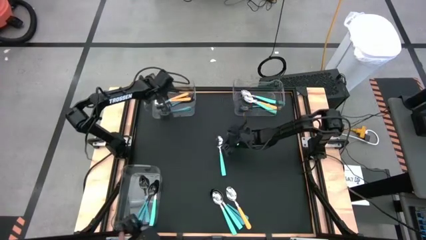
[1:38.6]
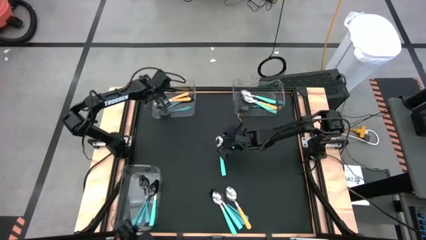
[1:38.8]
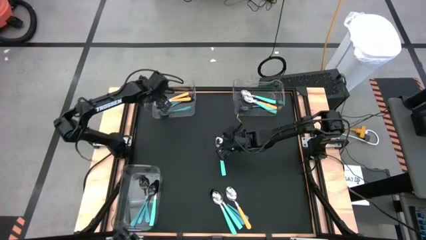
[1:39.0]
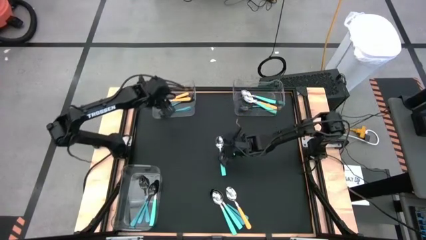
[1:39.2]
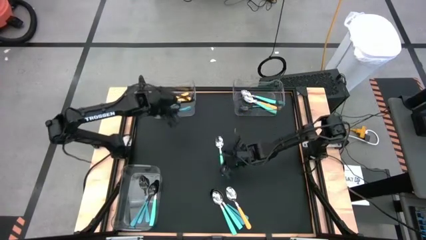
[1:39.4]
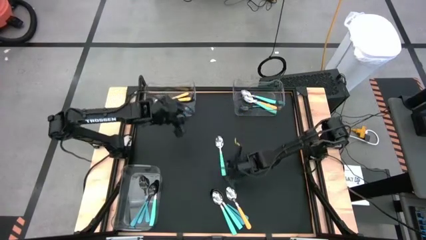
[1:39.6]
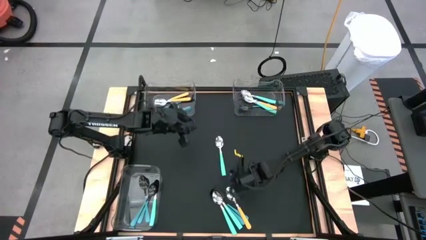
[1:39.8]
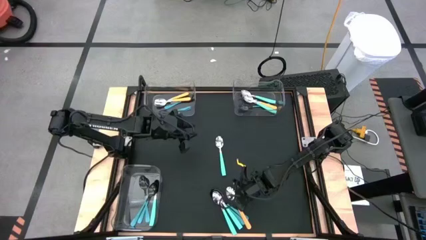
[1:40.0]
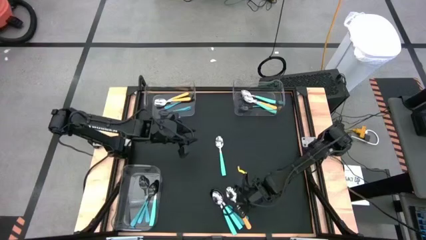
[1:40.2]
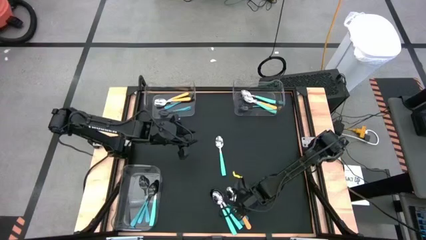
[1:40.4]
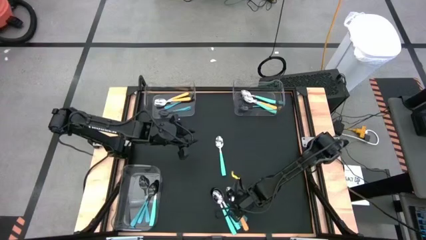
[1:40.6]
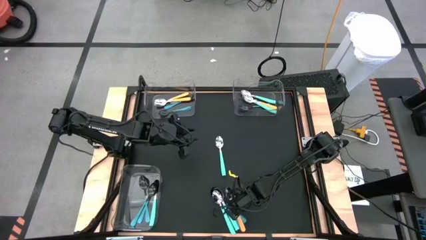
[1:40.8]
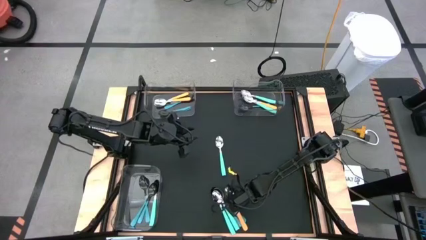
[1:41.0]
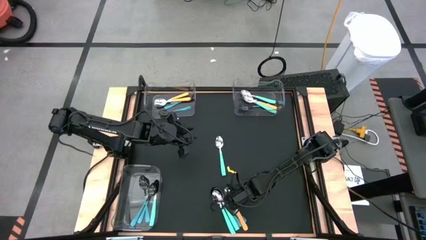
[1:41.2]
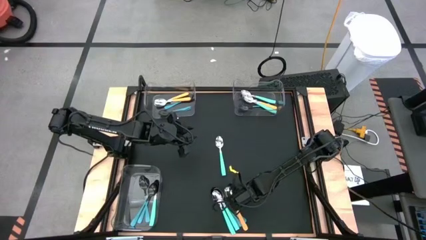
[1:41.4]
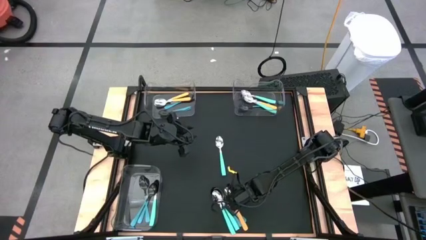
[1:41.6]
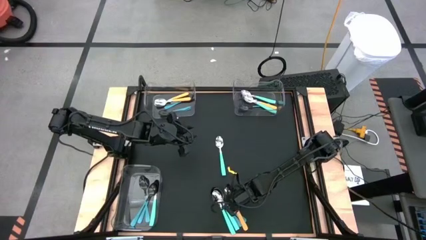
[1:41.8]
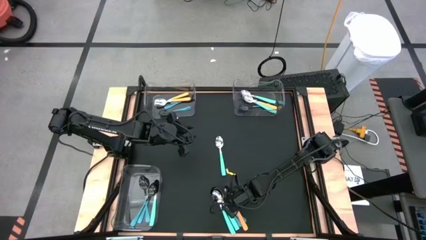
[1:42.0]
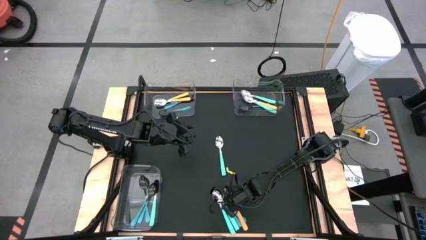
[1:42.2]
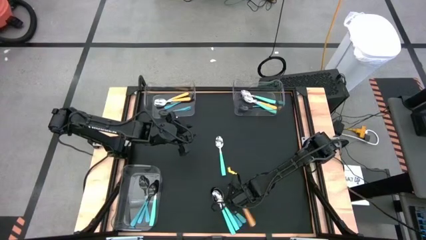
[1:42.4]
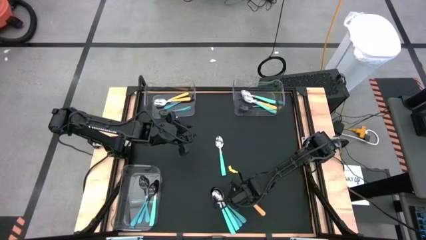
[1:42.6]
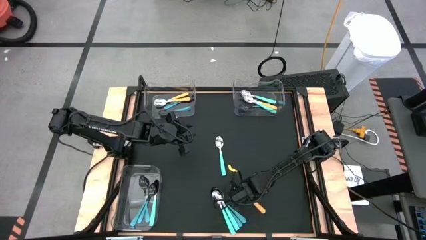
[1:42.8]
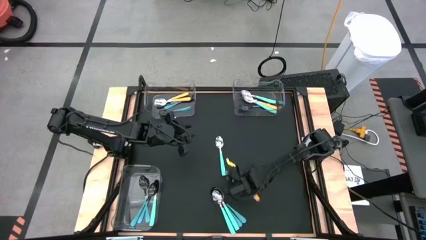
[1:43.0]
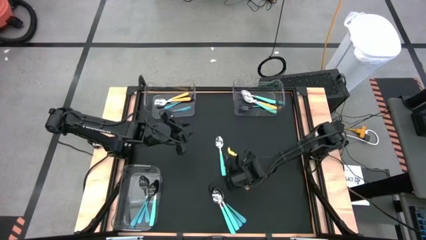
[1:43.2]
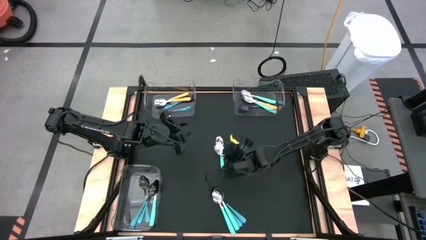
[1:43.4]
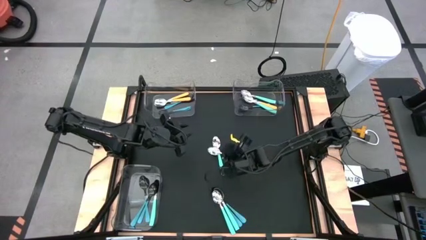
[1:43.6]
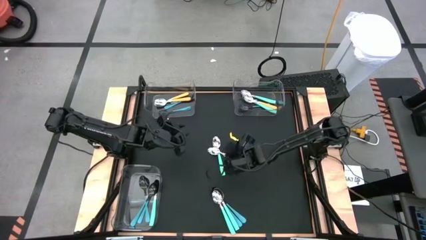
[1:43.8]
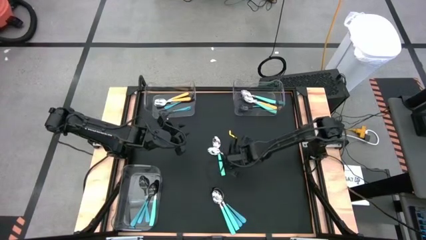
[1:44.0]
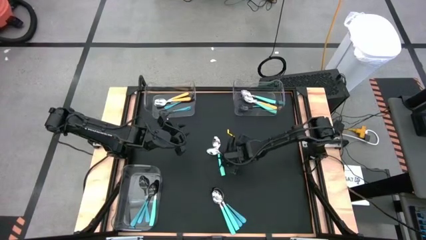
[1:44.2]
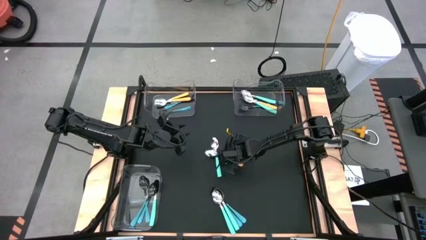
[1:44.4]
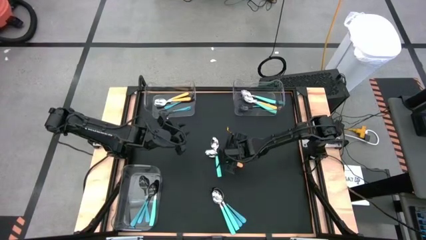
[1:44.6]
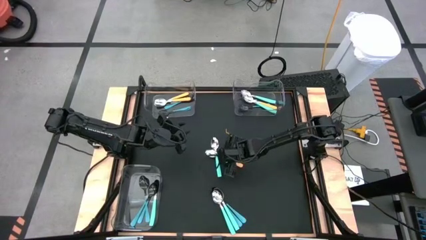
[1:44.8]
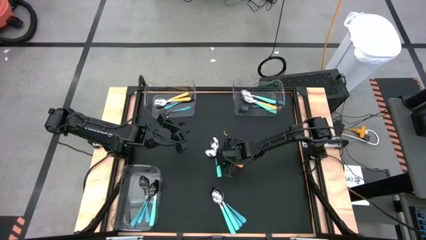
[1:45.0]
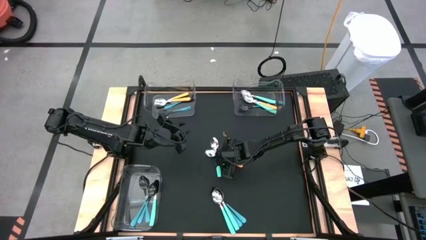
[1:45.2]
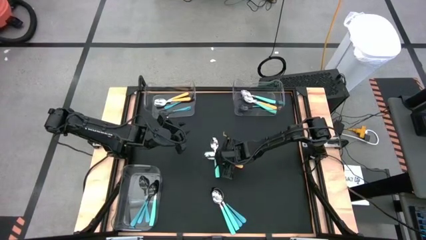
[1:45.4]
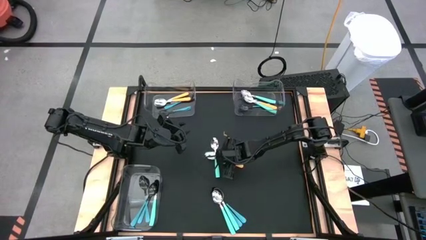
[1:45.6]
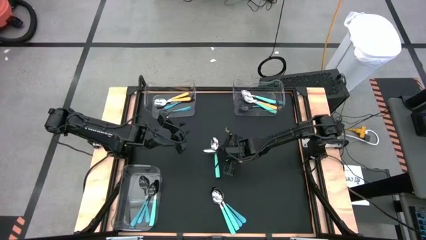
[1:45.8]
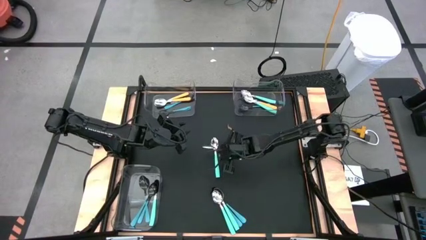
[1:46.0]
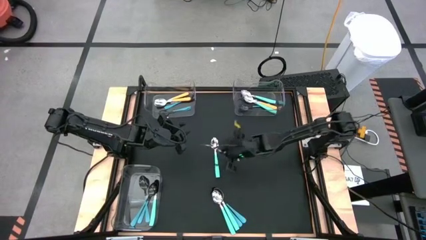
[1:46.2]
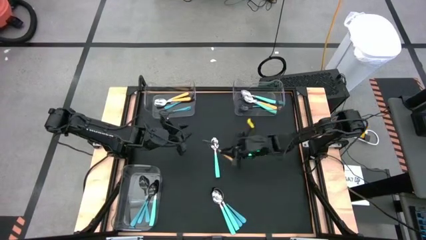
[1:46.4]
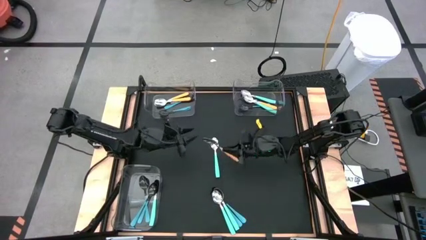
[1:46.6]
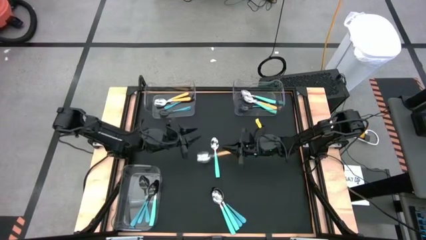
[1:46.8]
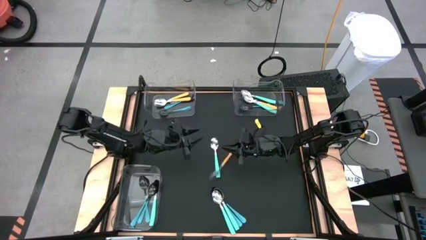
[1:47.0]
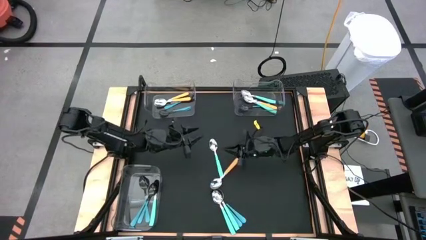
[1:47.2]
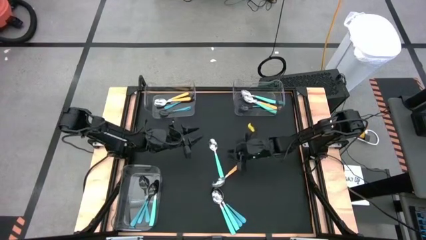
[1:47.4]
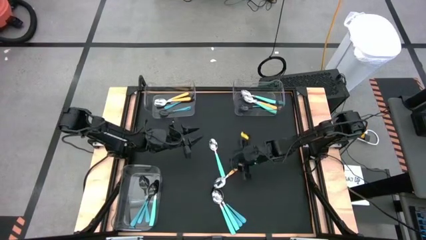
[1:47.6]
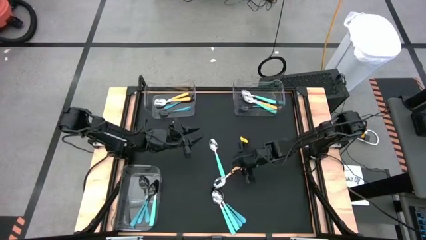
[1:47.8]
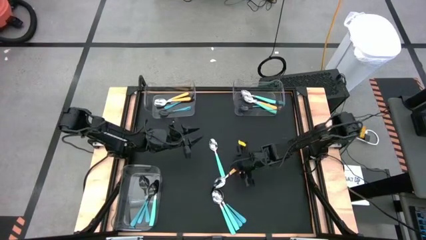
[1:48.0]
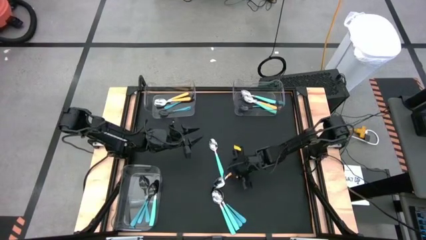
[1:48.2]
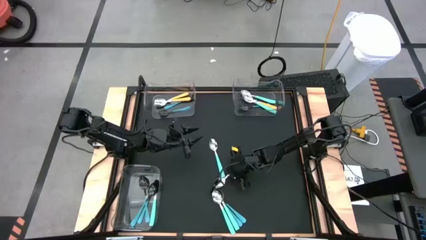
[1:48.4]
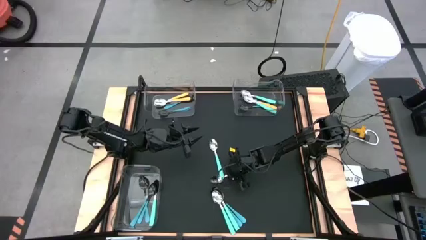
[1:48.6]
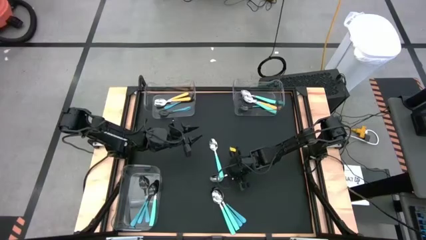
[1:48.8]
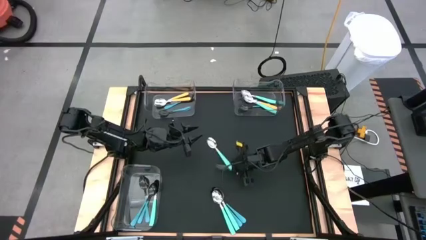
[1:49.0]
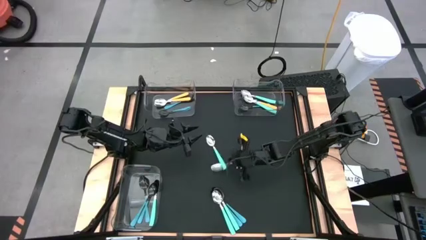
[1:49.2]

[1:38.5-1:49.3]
Task: Sort silverware by color (type)
Put the yellow spoon into the top left transparent bin

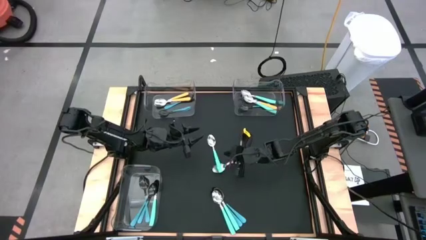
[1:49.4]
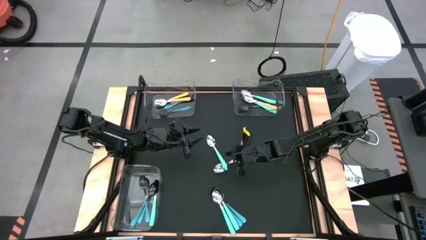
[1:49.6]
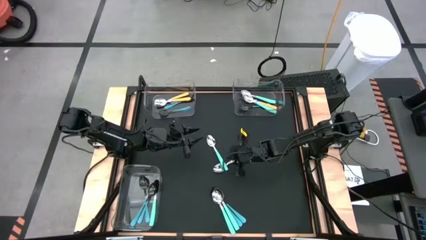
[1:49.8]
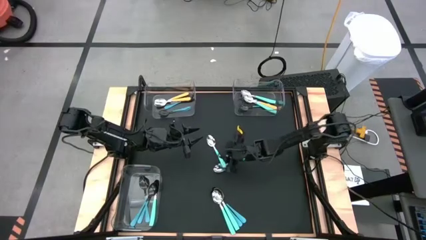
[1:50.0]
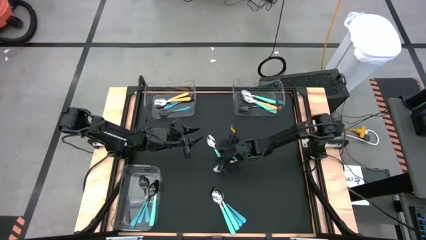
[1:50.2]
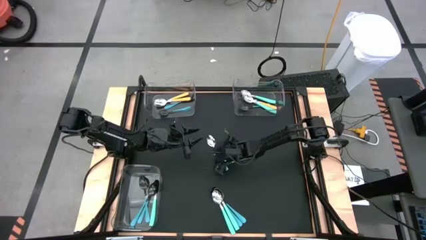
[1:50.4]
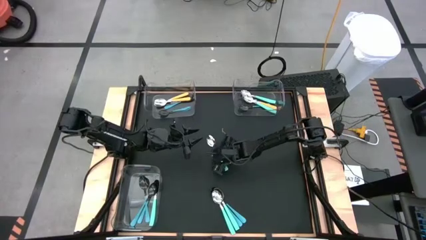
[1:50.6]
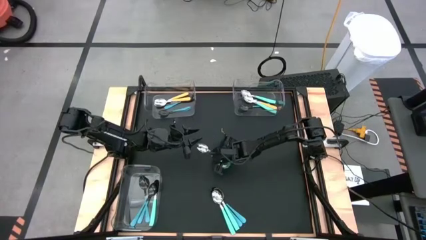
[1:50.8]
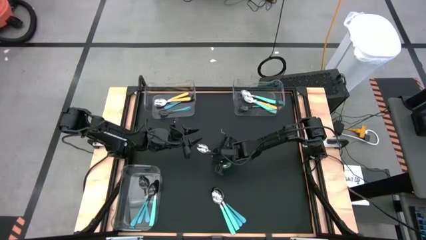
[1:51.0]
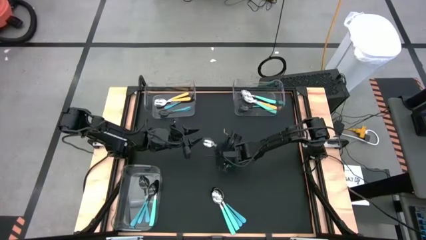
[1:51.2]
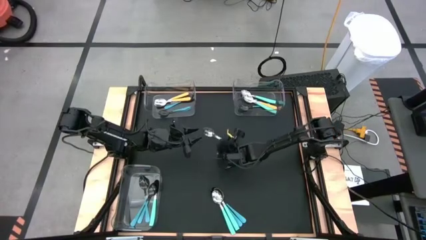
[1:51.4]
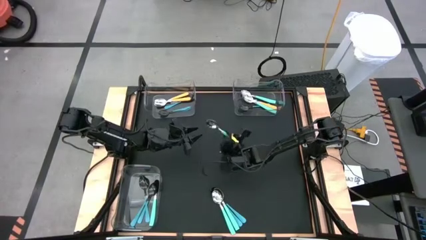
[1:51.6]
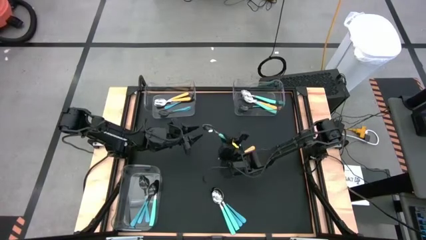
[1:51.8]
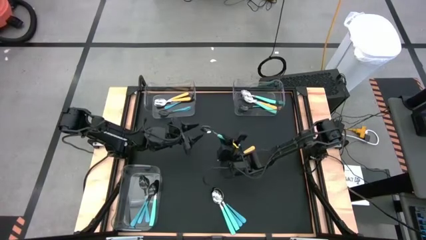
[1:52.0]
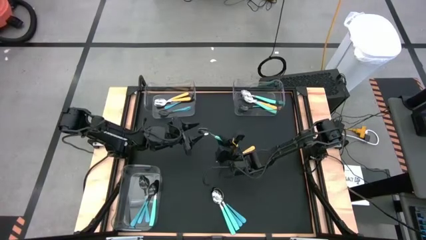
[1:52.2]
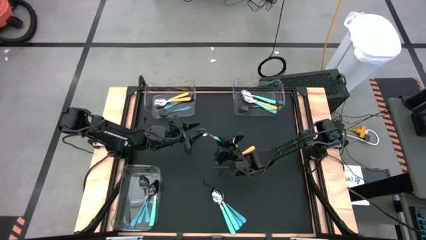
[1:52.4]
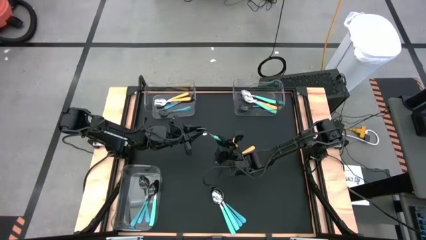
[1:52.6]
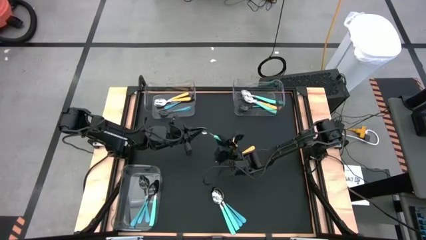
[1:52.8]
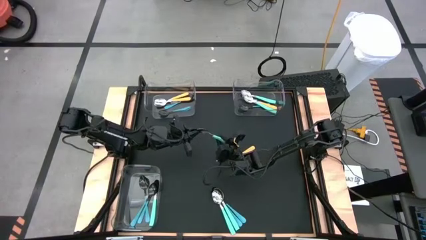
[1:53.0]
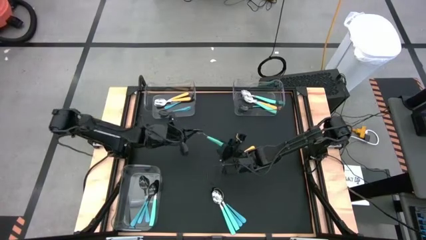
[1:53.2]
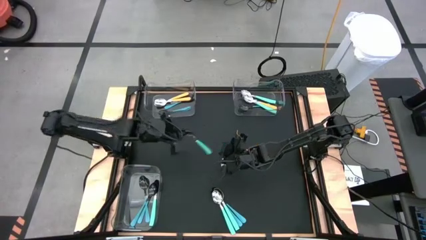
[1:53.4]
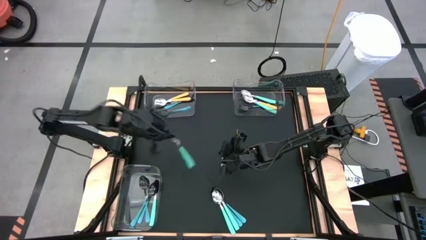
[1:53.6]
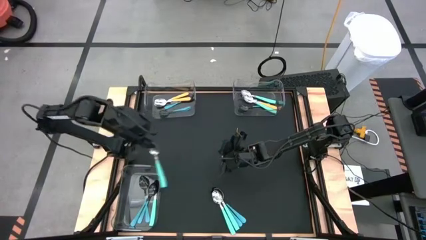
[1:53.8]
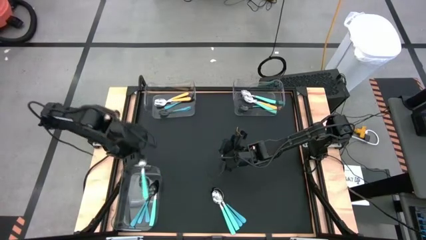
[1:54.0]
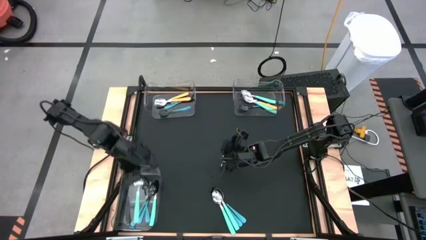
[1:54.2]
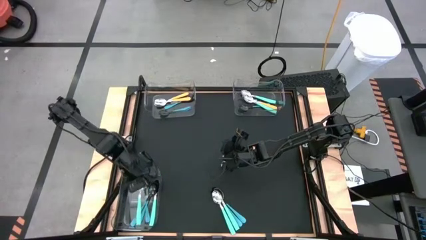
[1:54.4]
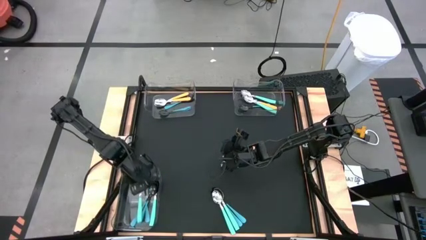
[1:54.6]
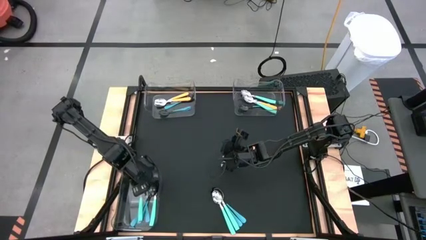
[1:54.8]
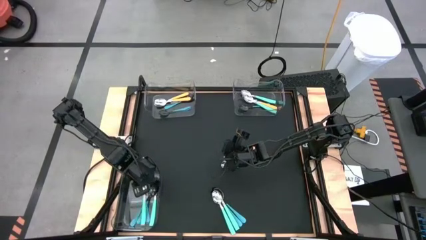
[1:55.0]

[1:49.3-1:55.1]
Put the green spoon into the bottom left transparent bin

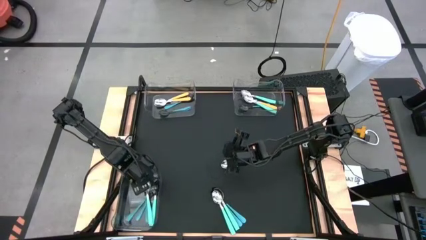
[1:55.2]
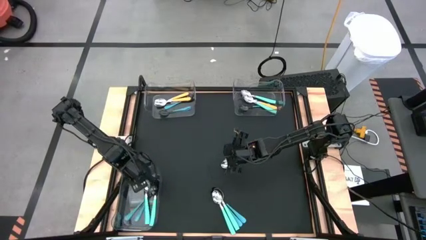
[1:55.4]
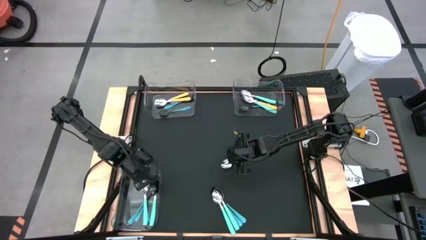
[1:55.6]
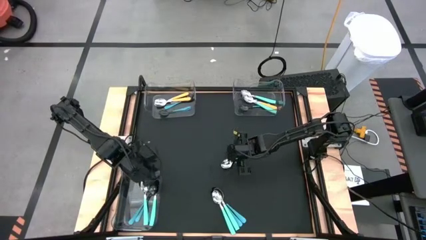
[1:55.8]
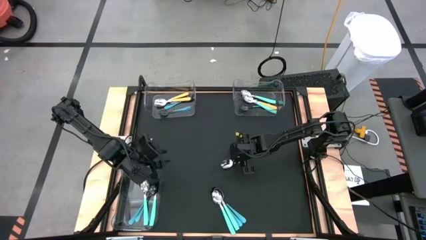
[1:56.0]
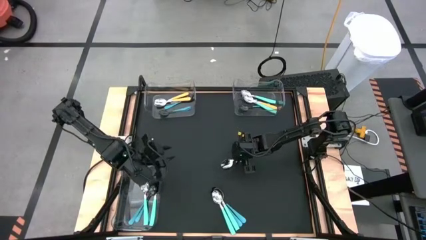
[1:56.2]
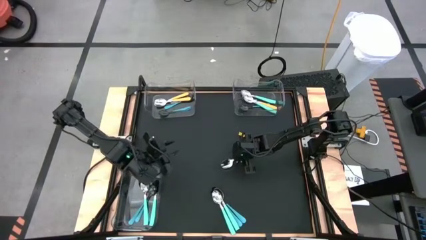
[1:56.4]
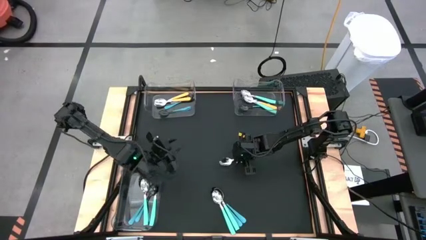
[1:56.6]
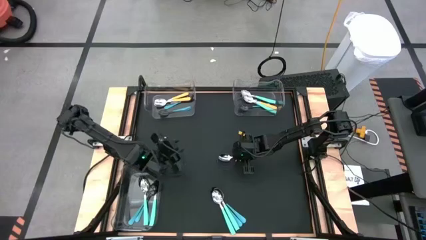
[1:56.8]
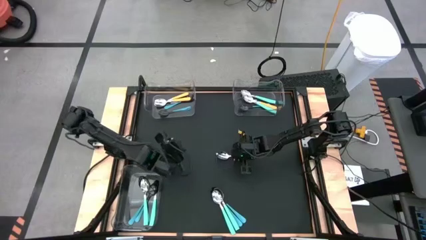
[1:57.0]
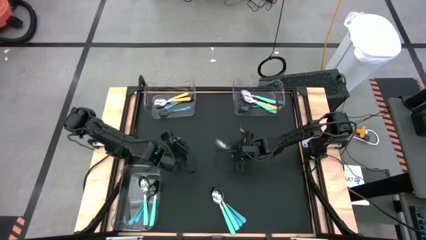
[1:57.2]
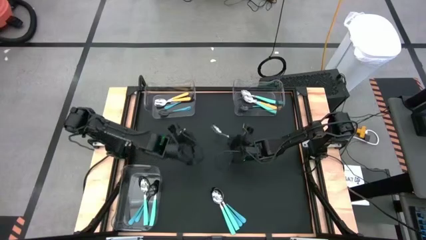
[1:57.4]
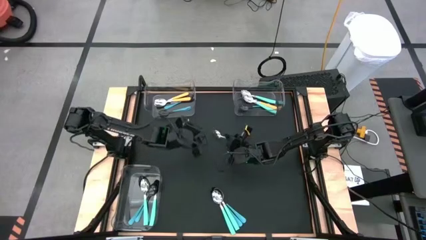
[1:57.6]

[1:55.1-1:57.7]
Put the yellow spoon into the top left transparent bin
